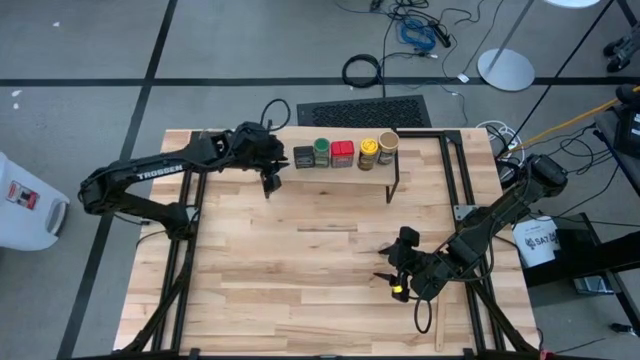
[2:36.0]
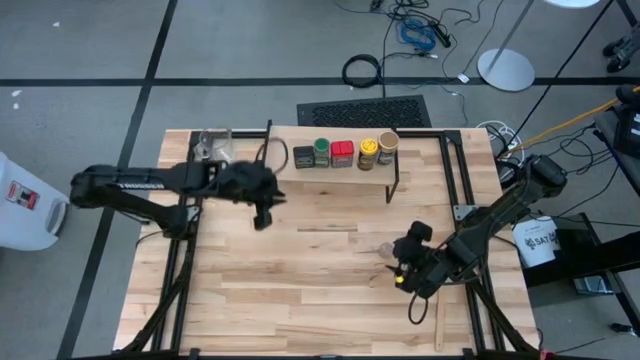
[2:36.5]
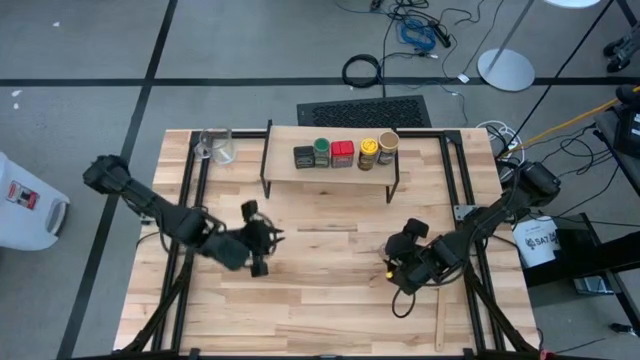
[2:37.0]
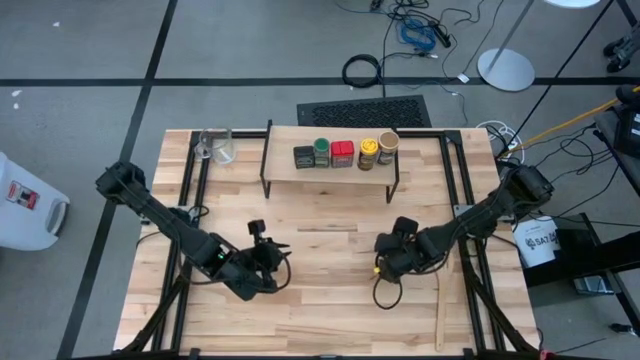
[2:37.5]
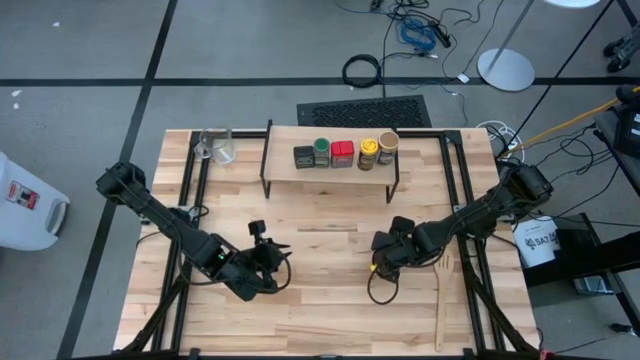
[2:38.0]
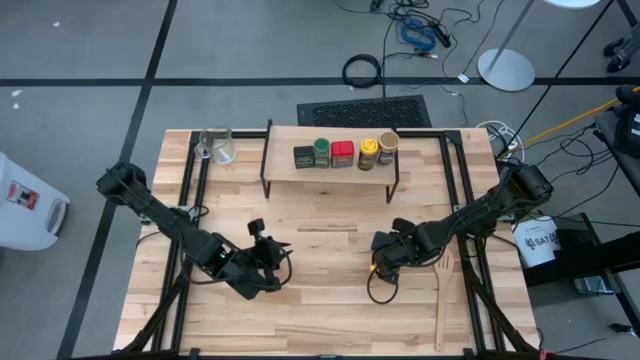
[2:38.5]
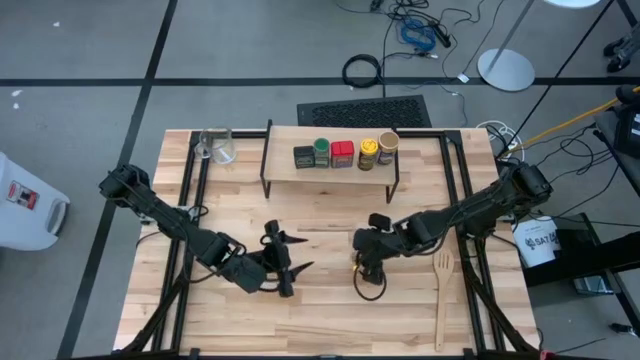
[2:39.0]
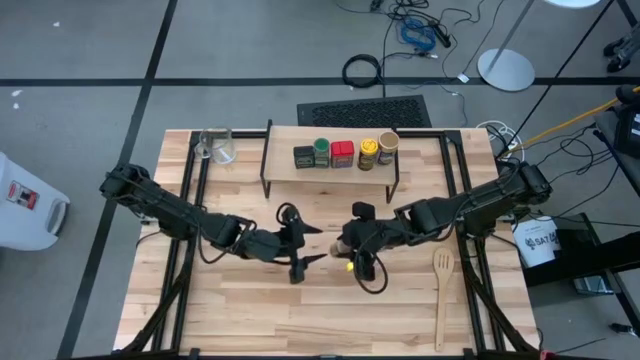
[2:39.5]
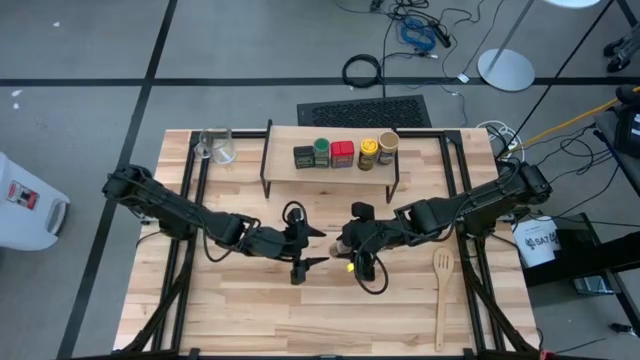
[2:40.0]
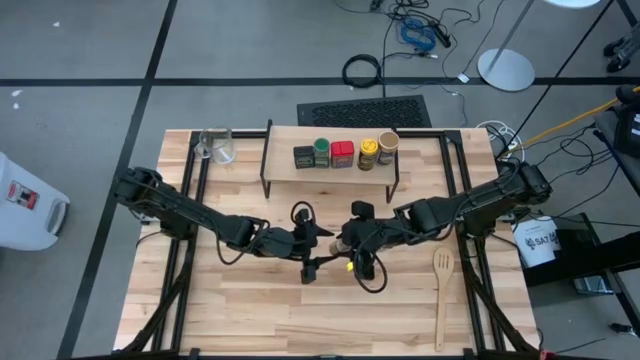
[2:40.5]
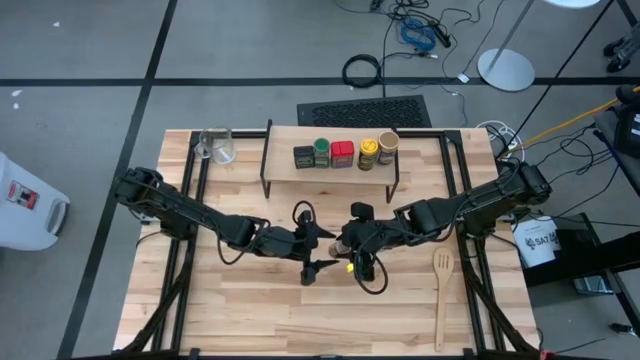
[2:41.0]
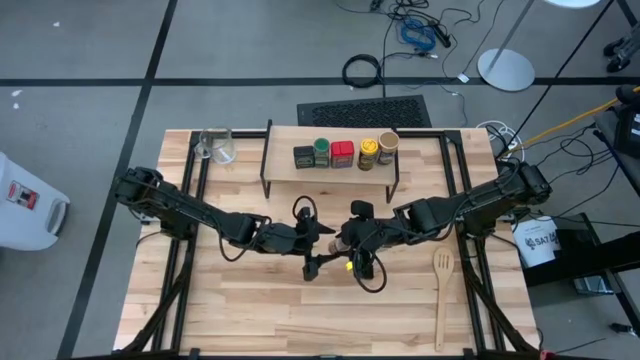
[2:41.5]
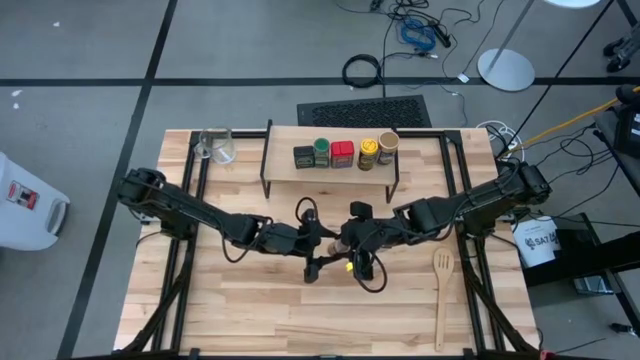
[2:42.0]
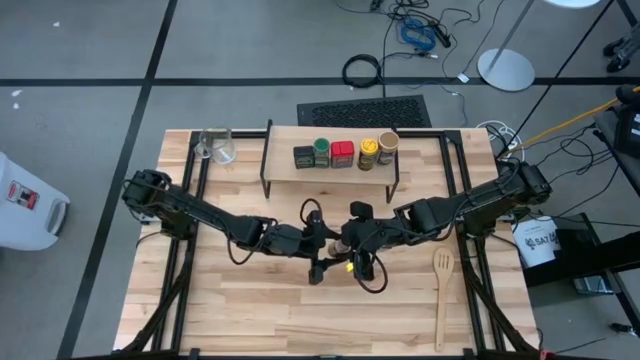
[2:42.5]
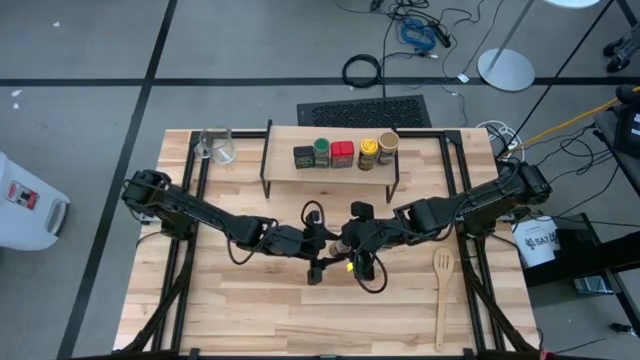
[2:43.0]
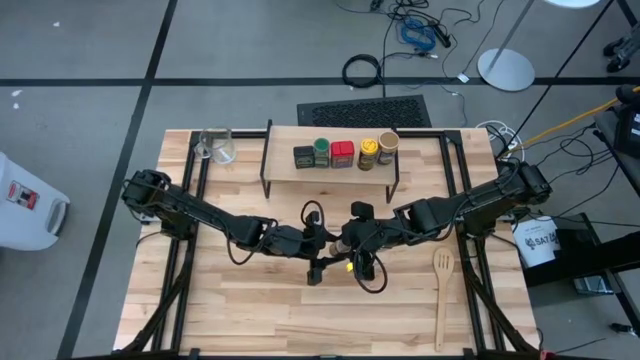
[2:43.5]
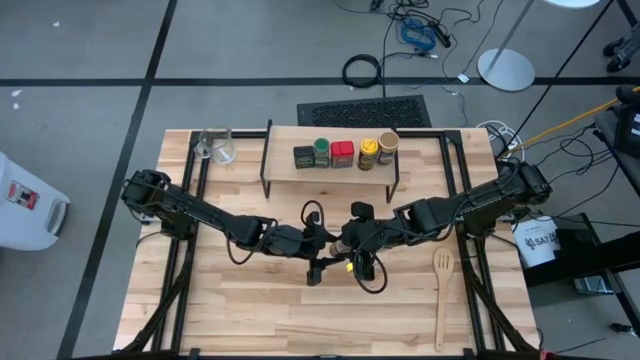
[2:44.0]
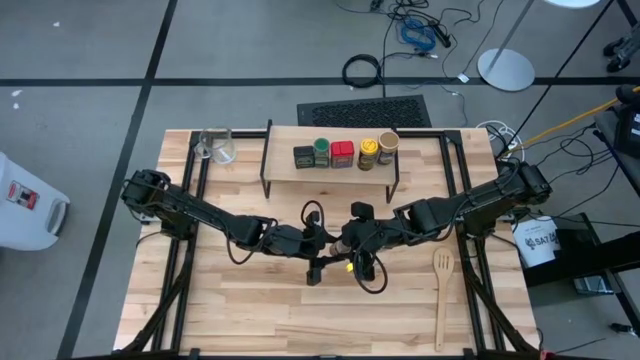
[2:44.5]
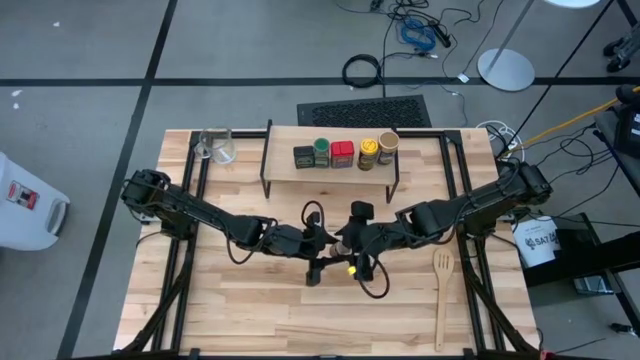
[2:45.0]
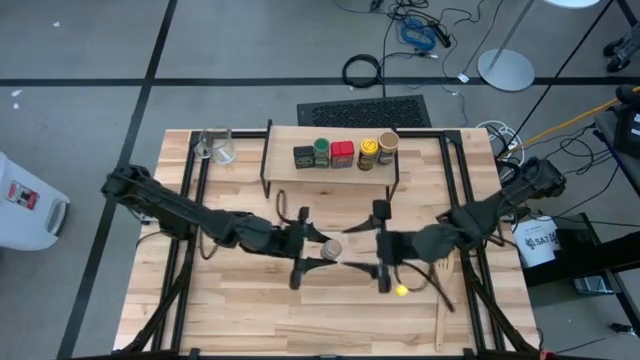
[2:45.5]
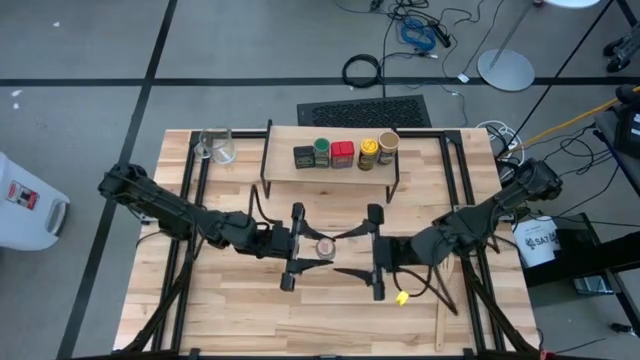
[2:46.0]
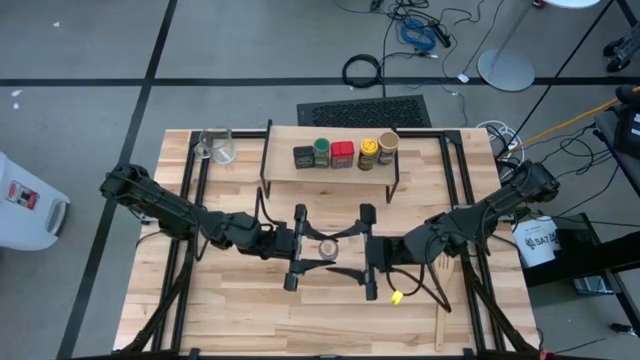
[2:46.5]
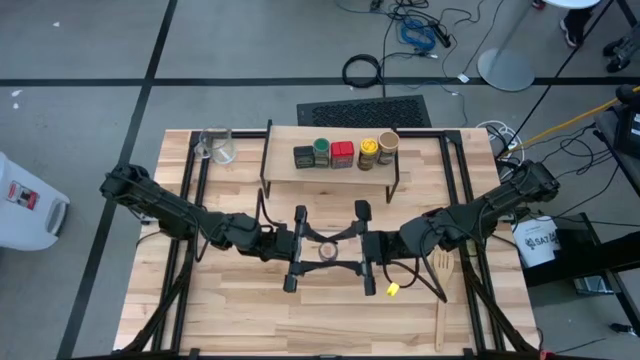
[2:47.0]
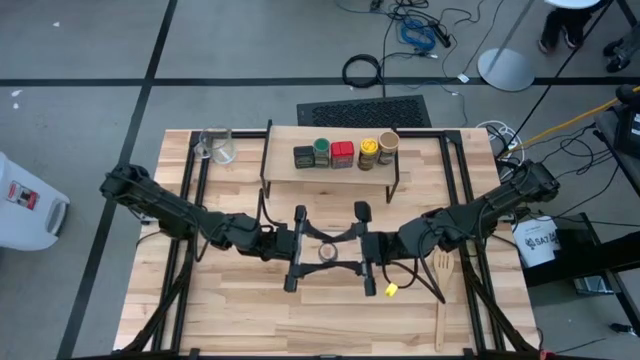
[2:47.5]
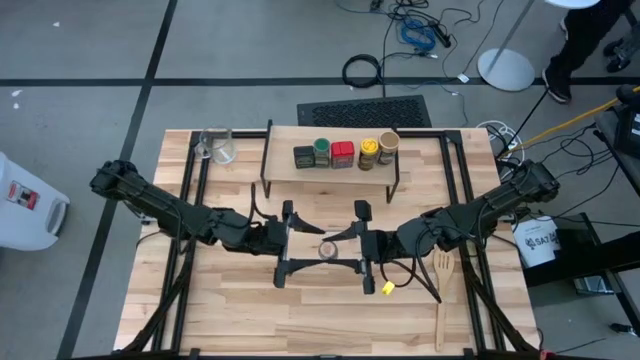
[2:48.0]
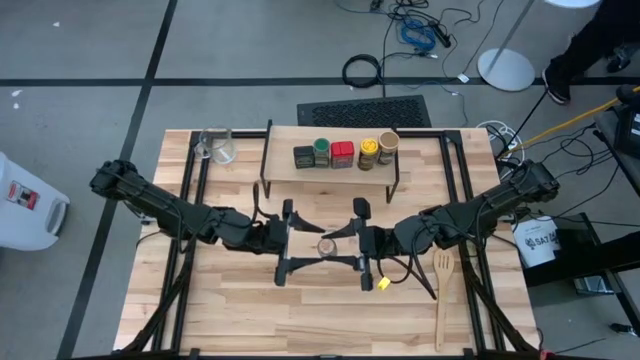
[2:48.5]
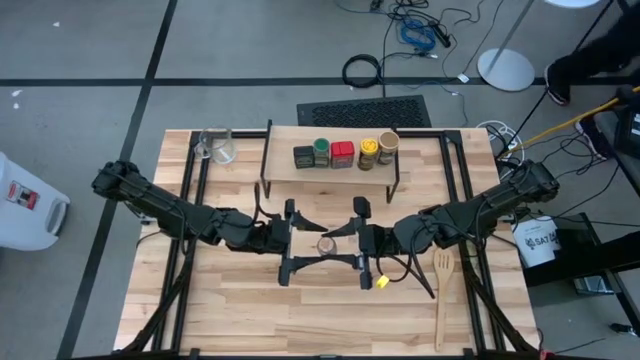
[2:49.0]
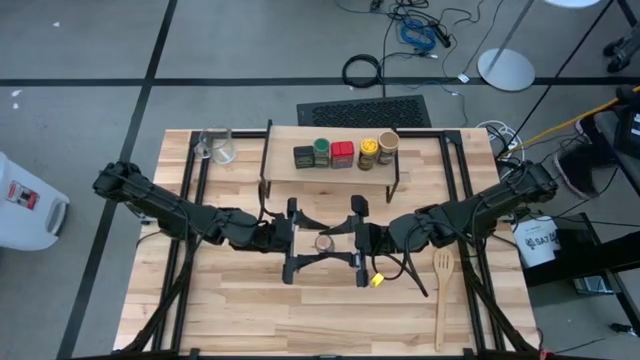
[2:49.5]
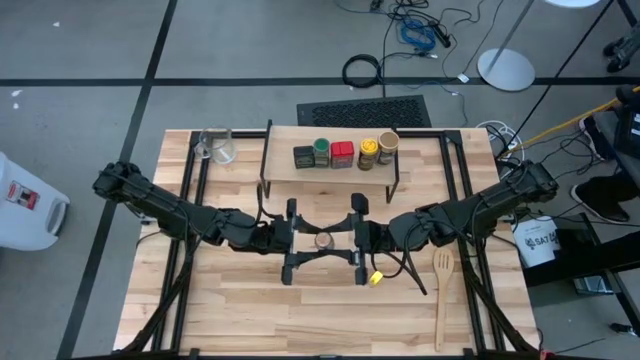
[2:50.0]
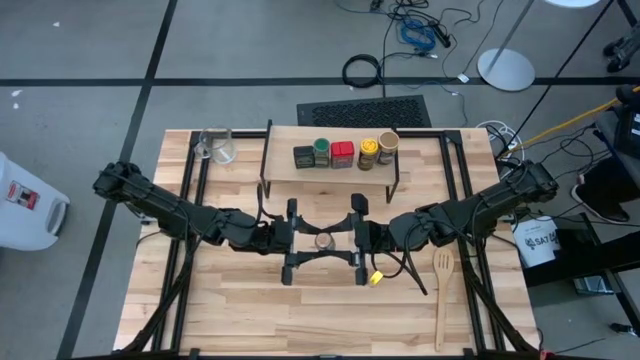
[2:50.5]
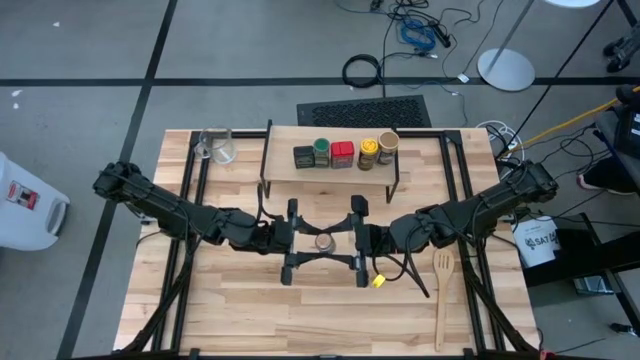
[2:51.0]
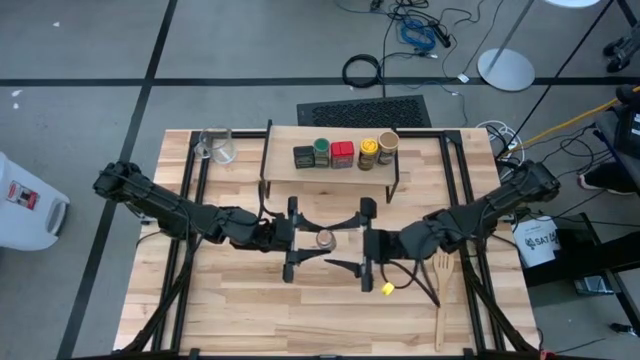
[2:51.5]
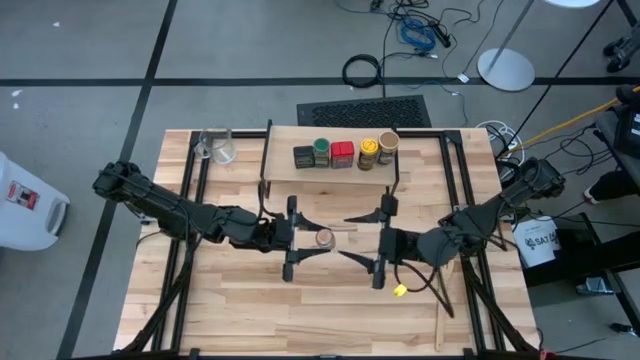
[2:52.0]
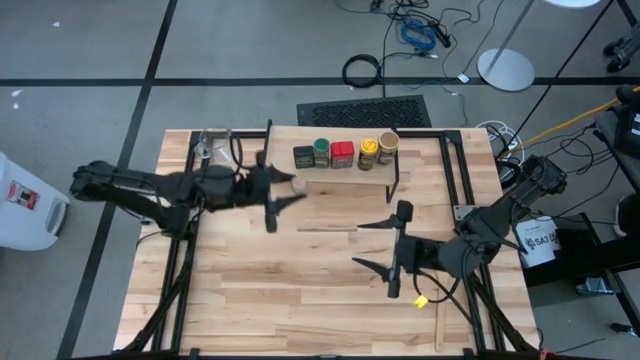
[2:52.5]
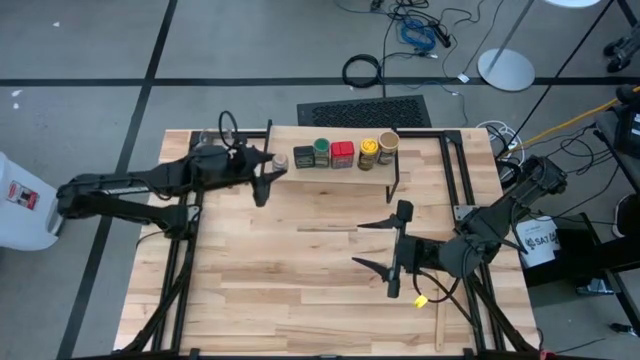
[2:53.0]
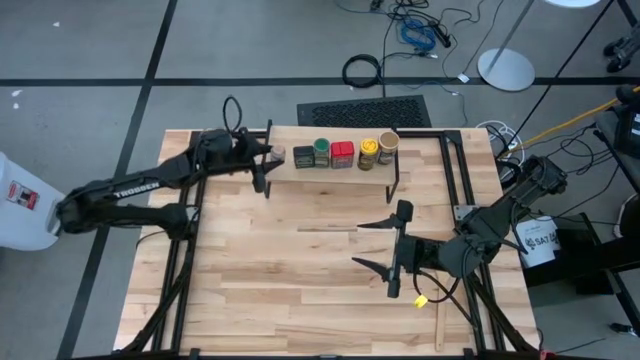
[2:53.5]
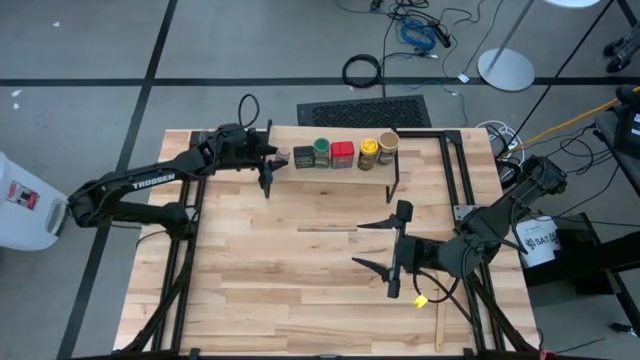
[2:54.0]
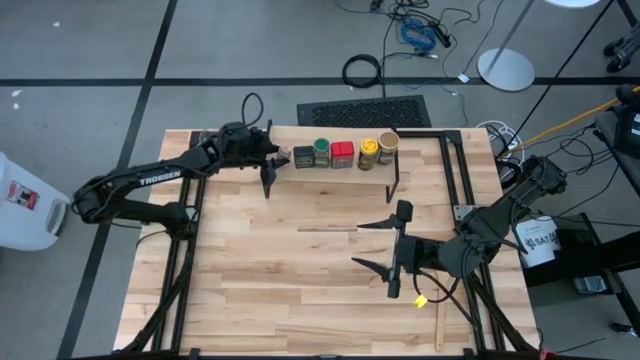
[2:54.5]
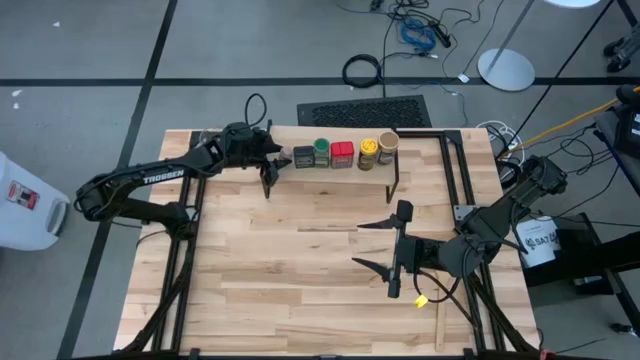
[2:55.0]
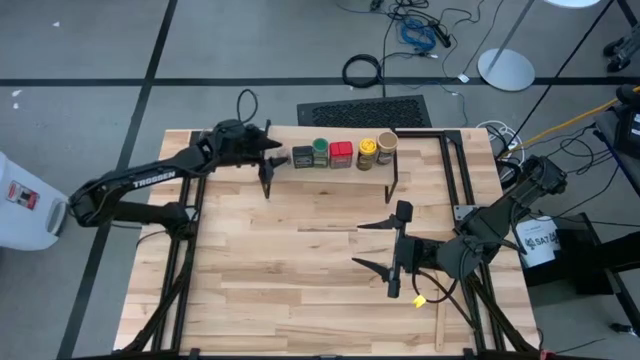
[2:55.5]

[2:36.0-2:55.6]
Task: Shelf spices
Put the brown seasoning bottle on the shelf
